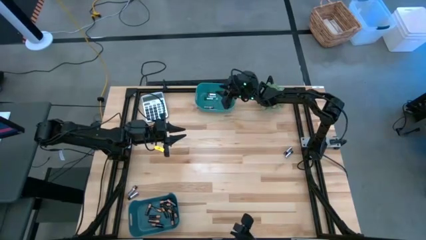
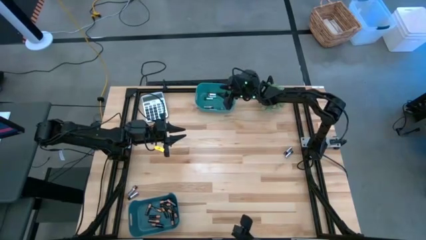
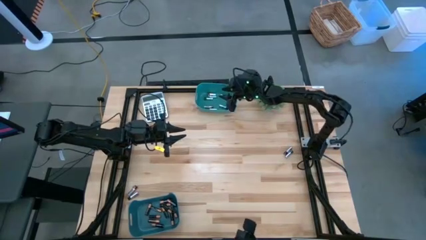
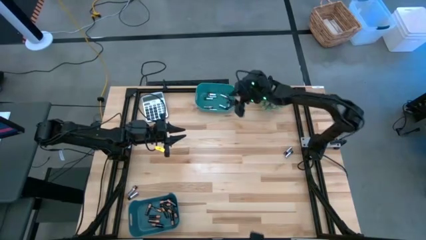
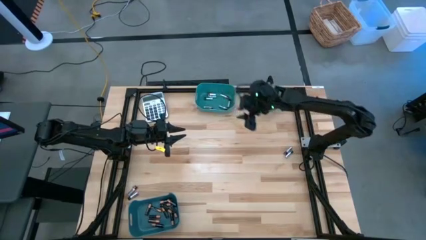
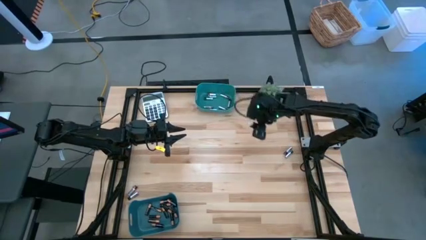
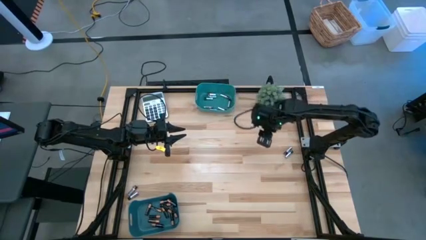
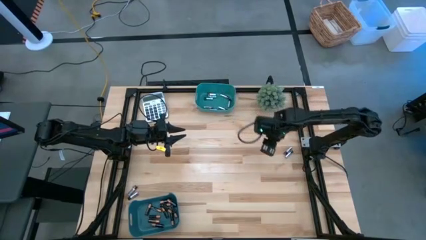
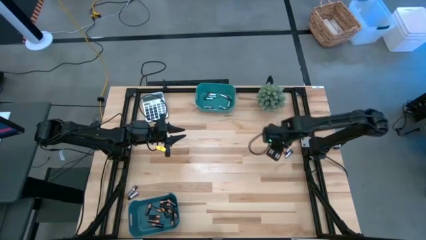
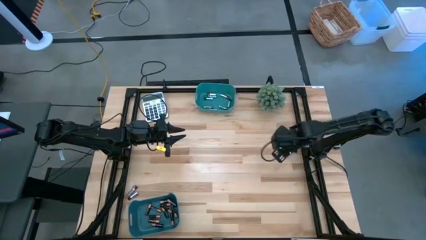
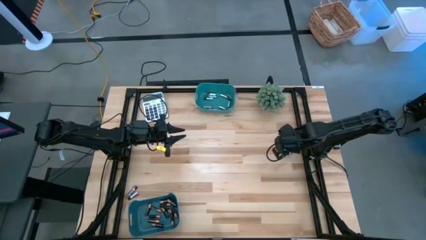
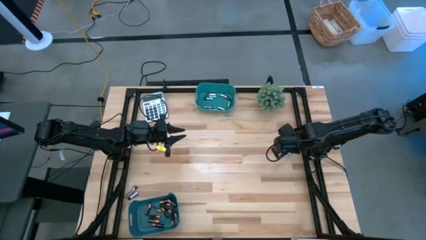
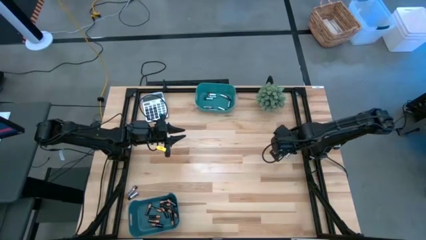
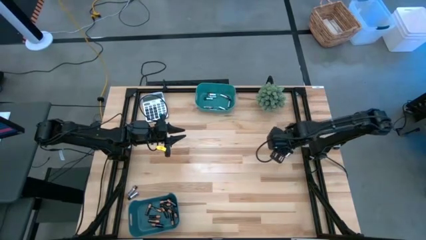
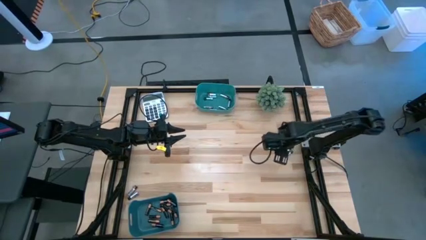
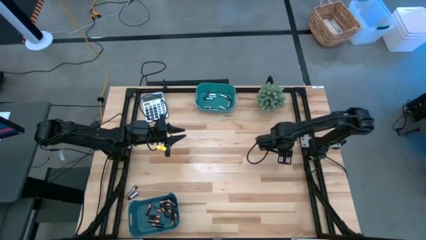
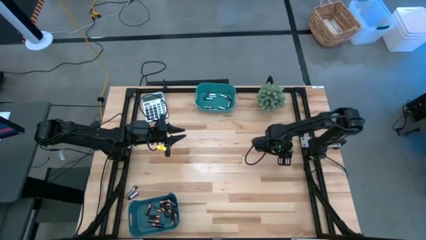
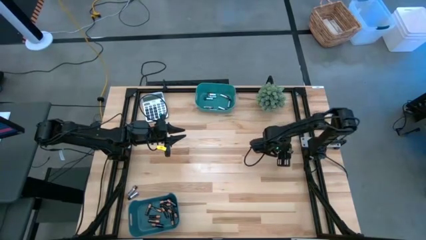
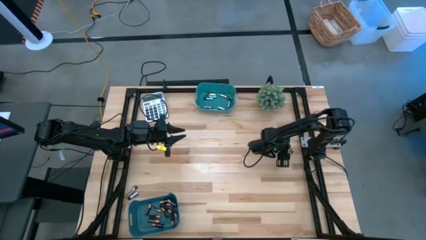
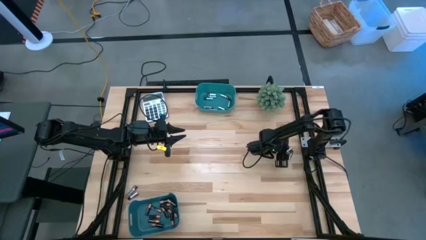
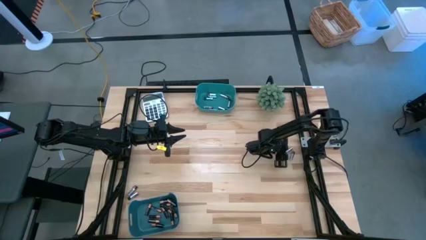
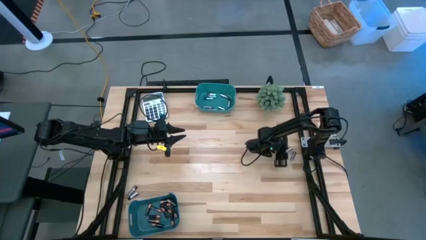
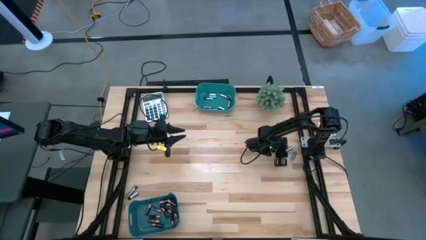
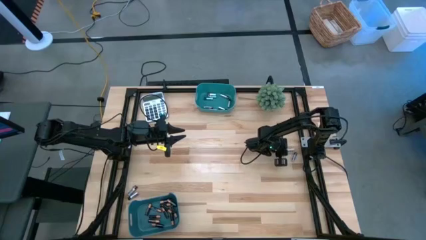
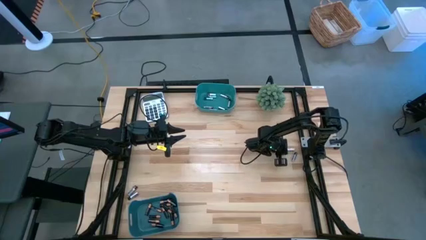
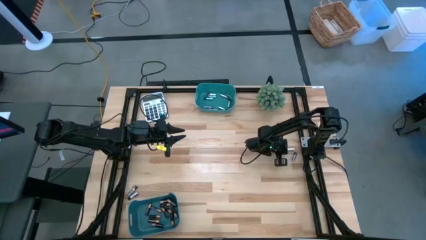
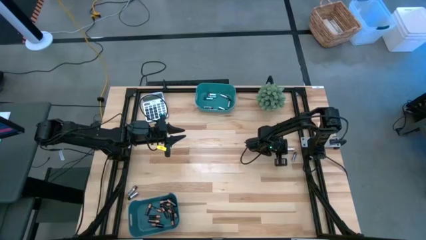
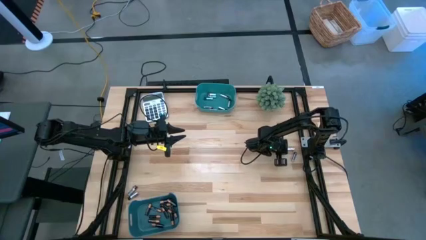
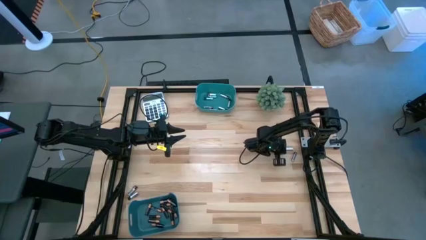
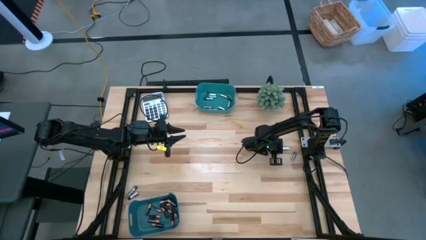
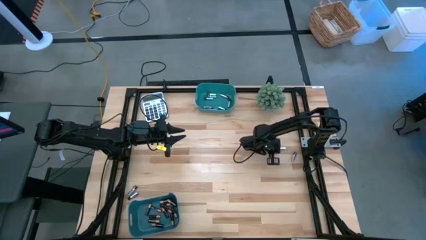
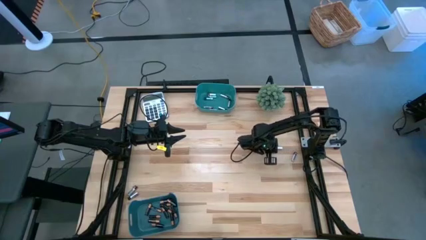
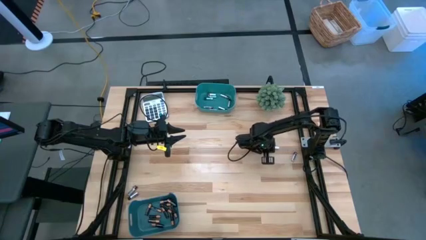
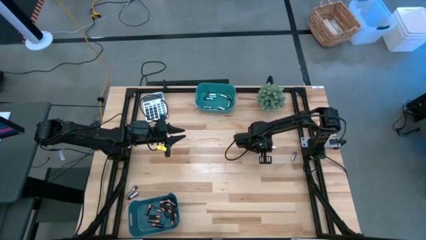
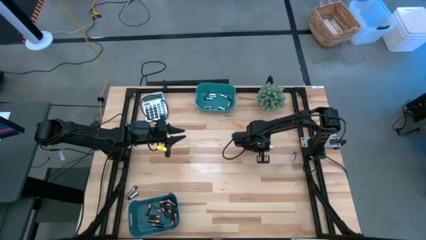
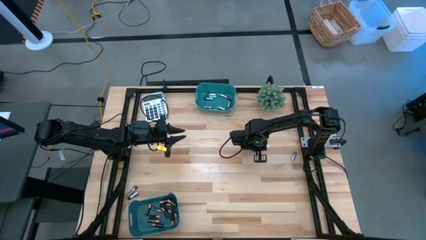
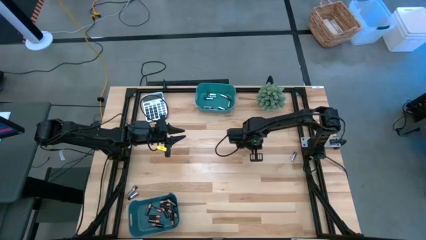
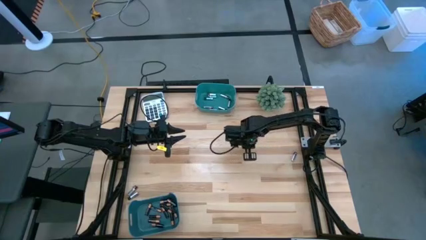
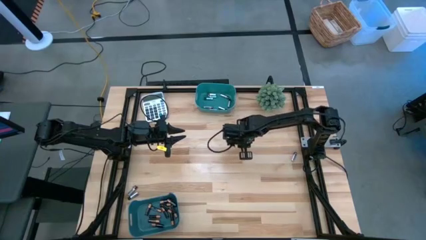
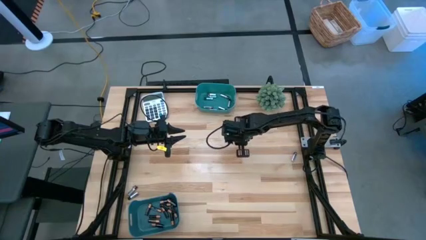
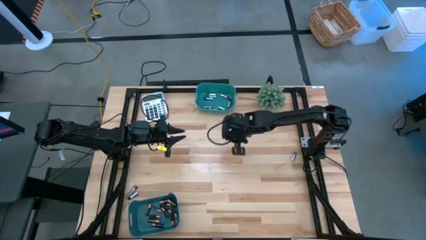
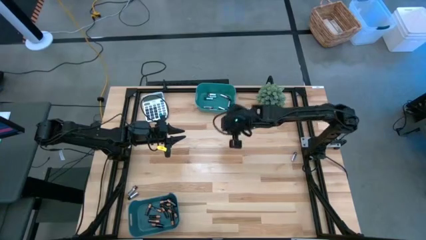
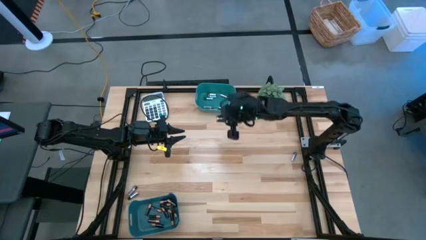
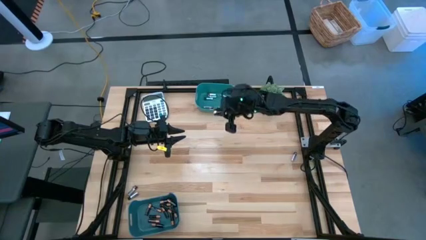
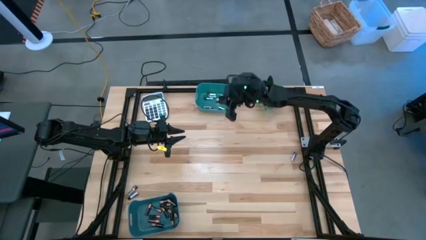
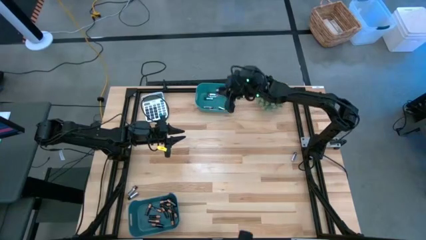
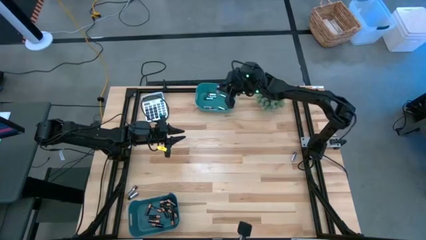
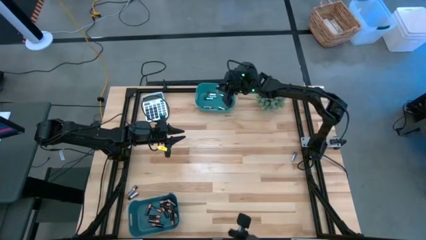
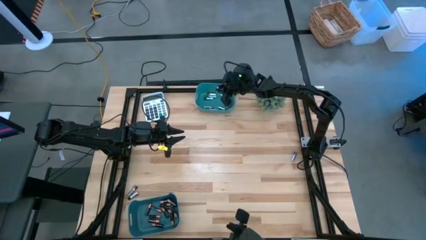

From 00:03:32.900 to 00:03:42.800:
Task: Sort batteries
Put the silver battery into the top green bin

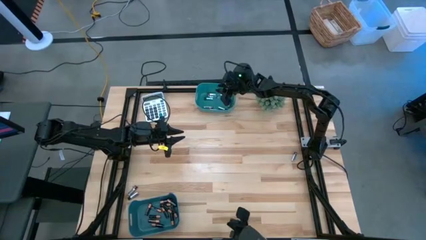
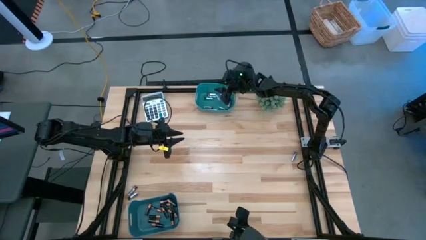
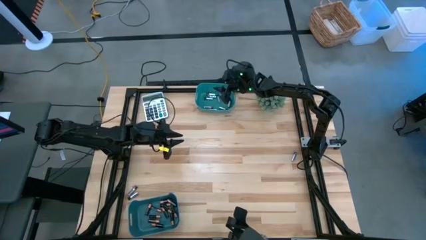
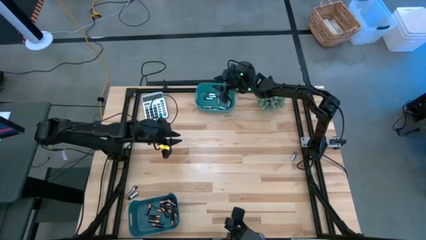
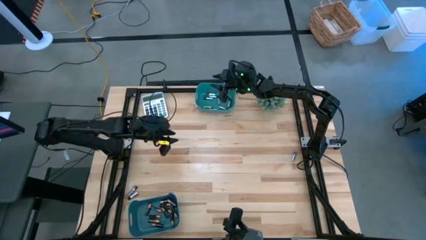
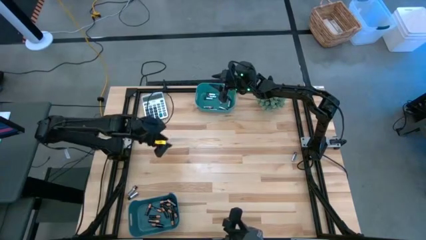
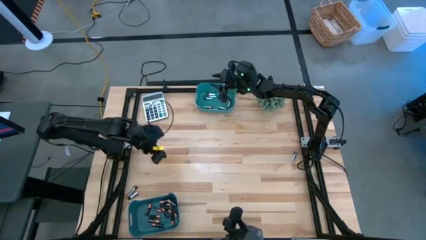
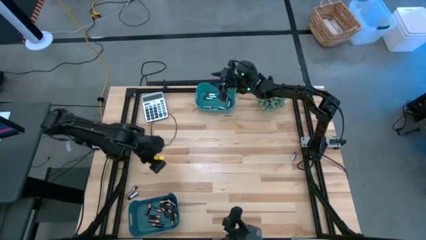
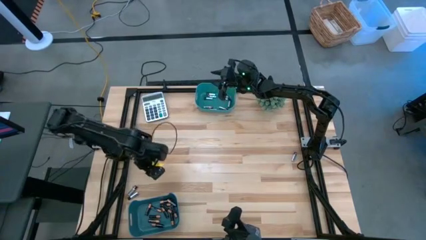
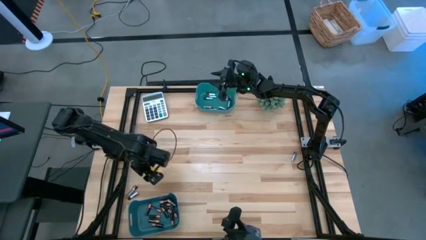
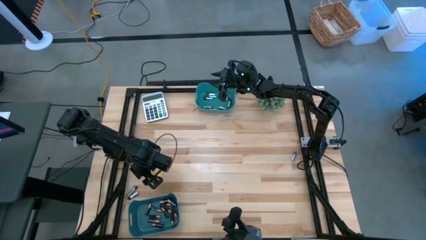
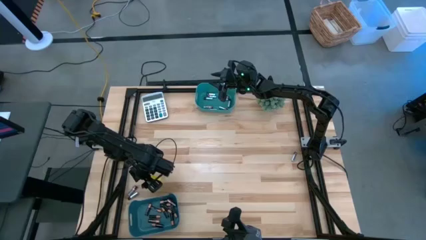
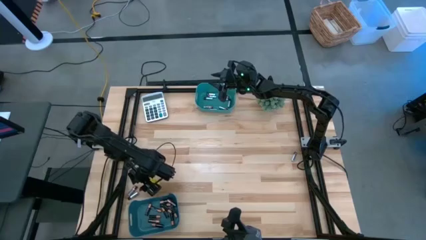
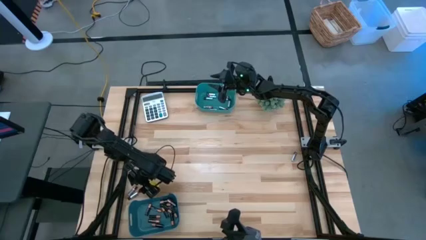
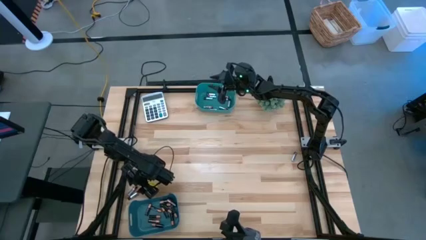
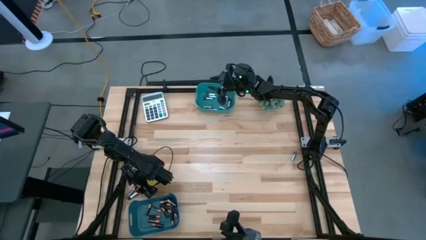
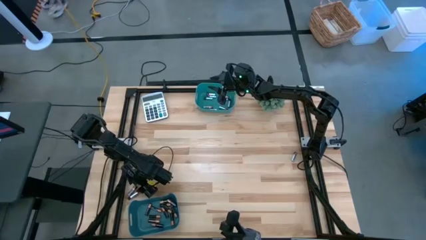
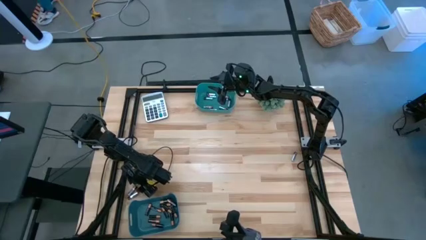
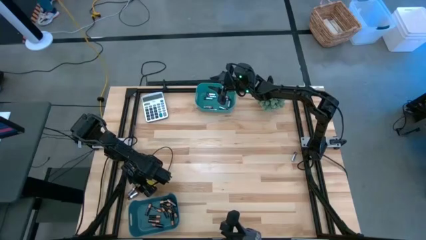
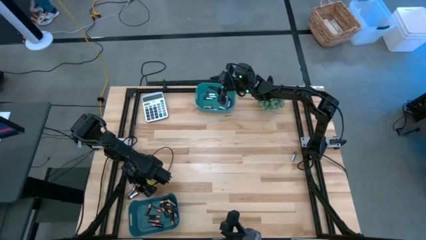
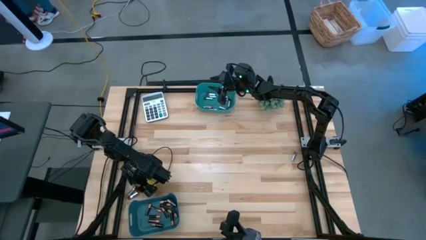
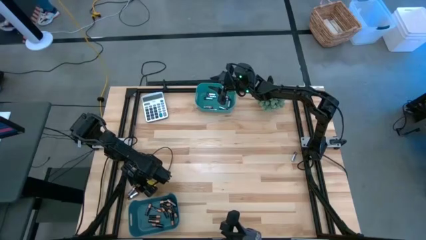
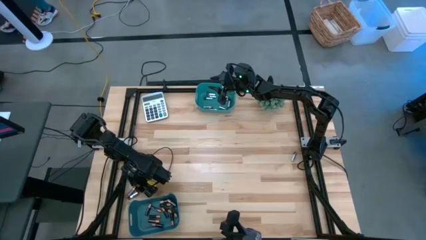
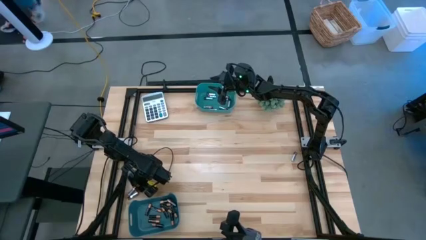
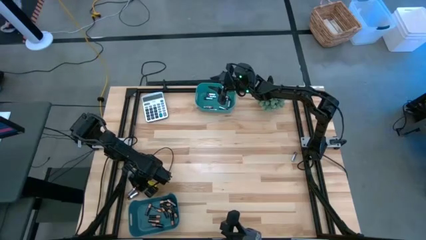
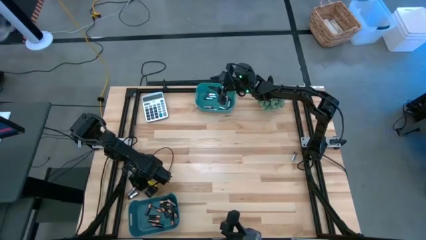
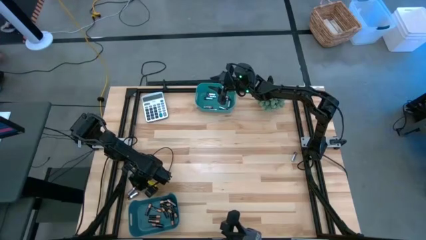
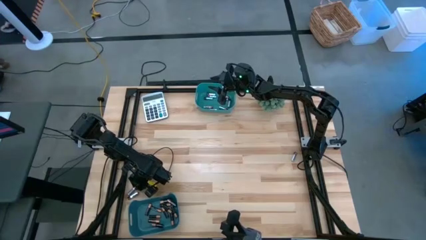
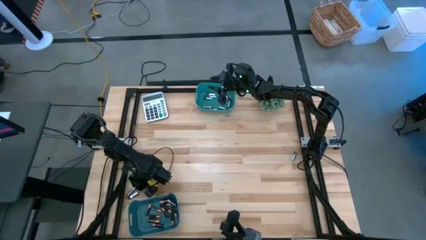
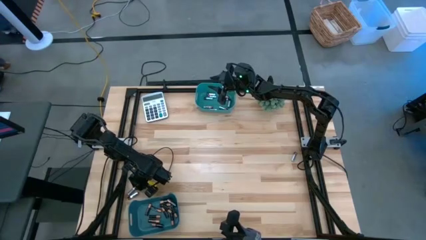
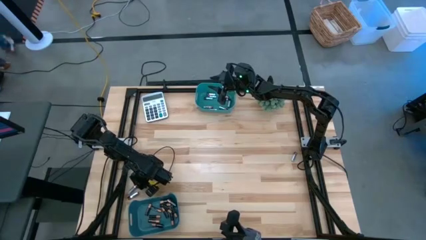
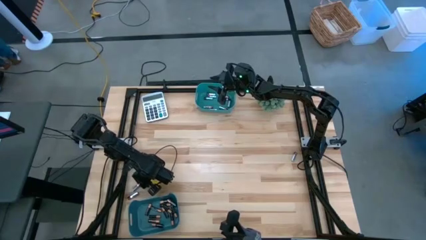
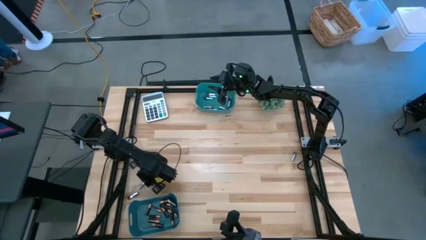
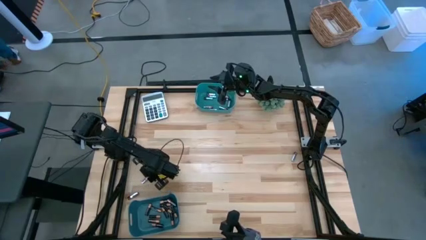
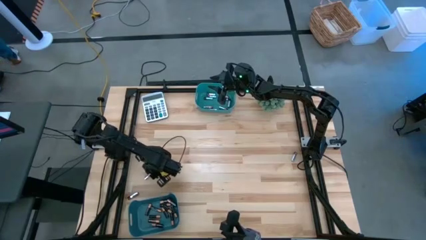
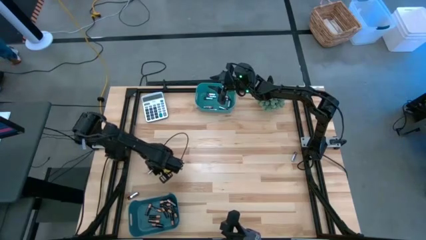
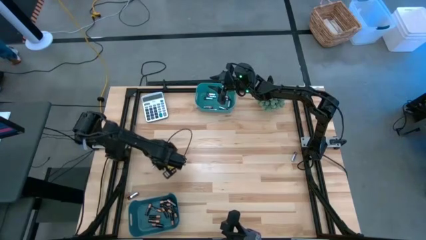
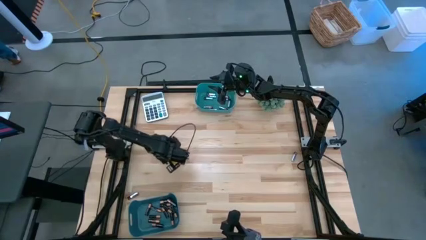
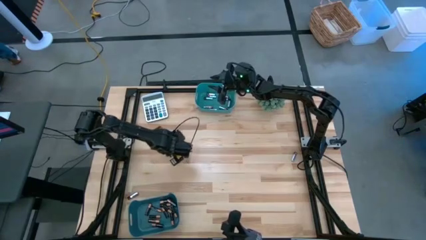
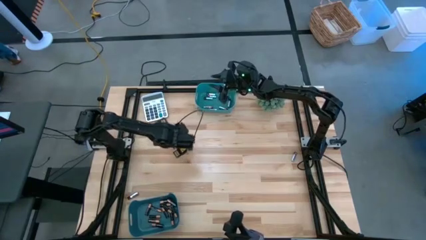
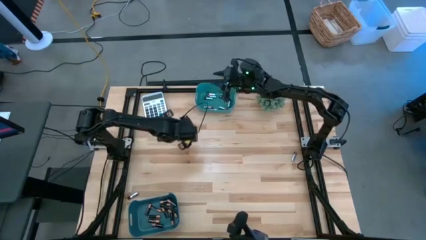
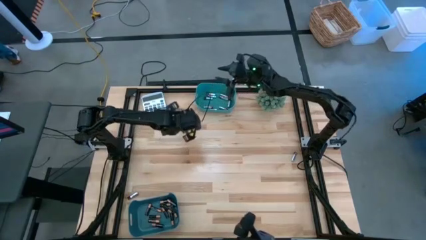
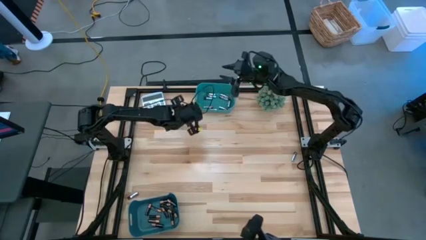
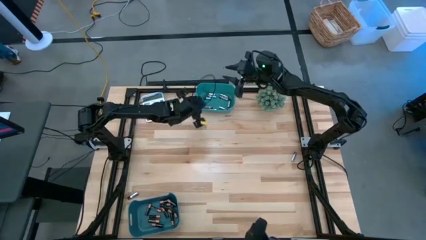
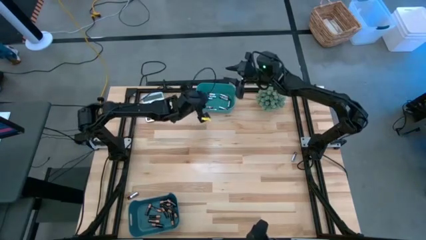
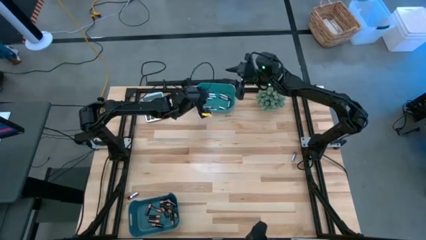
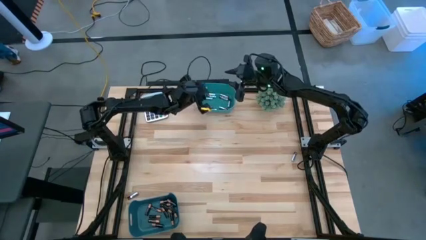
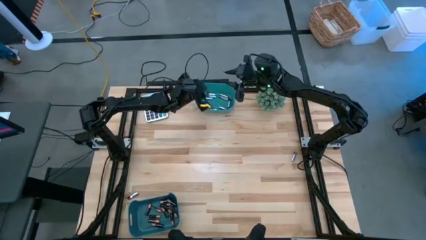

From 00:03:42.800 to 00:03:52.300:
Put the silver battery into the top green bin
